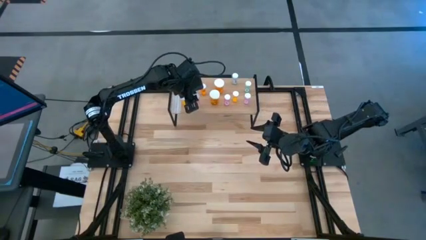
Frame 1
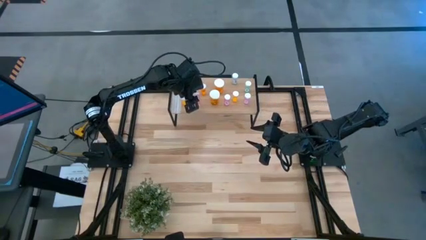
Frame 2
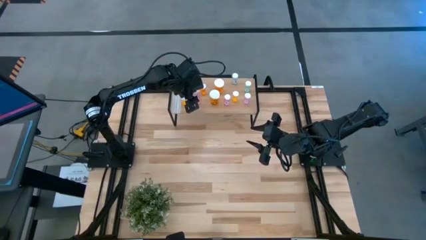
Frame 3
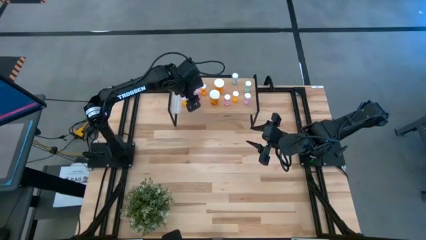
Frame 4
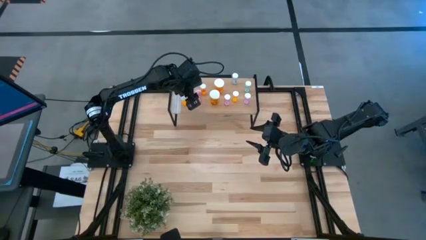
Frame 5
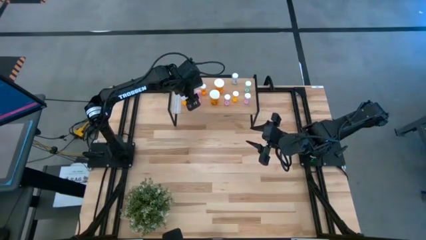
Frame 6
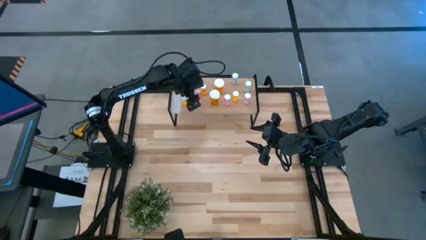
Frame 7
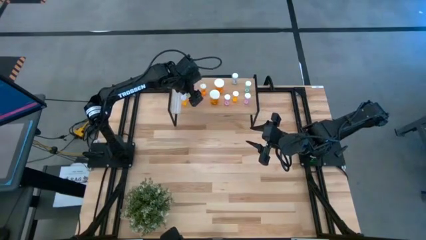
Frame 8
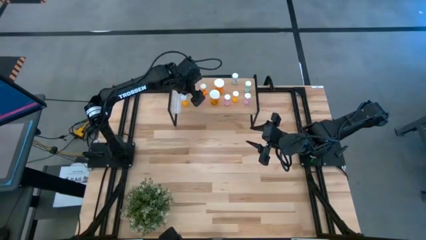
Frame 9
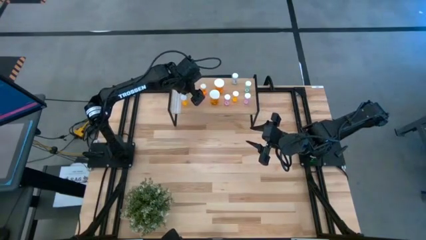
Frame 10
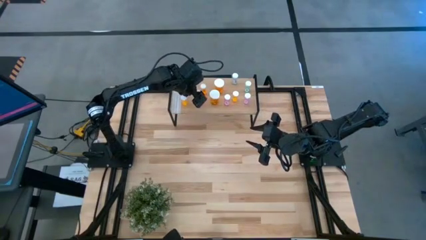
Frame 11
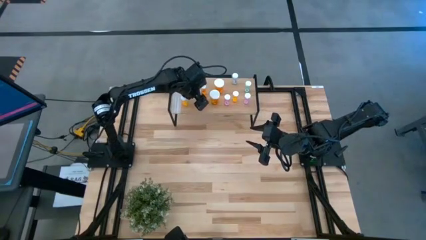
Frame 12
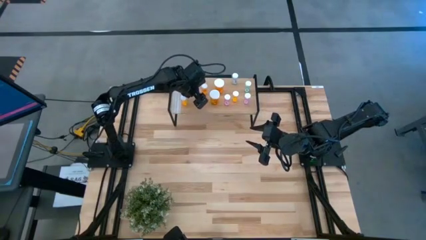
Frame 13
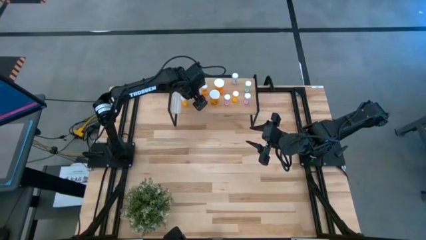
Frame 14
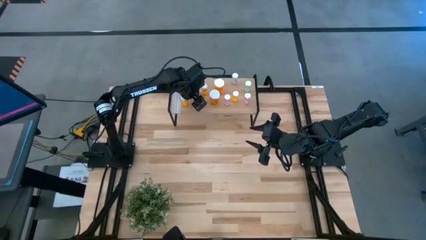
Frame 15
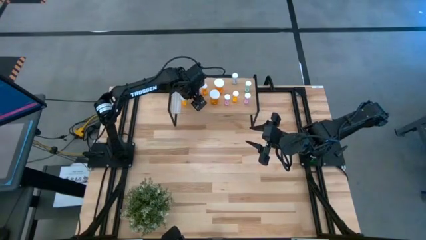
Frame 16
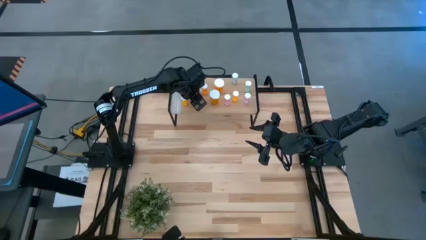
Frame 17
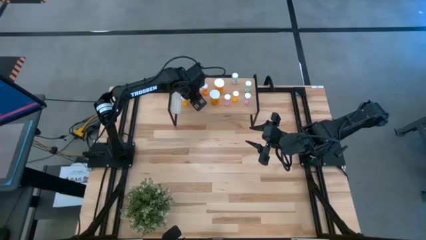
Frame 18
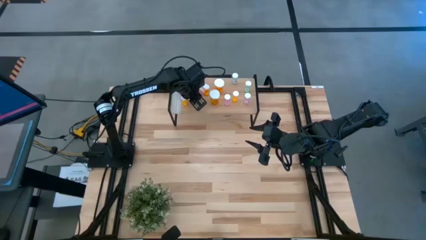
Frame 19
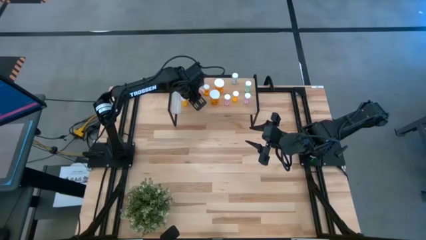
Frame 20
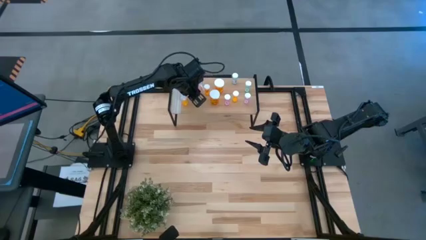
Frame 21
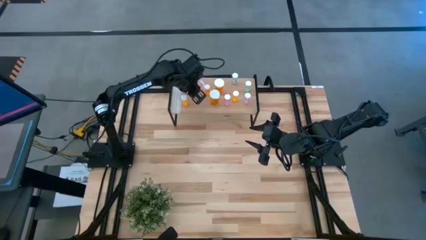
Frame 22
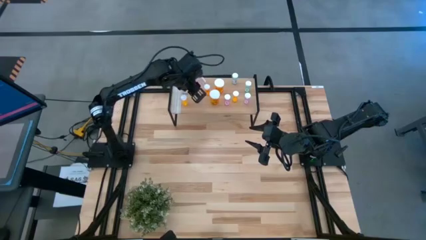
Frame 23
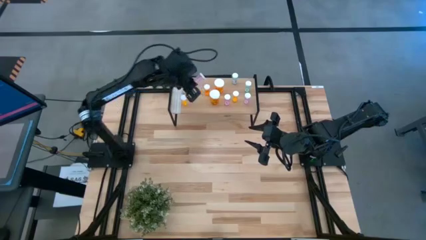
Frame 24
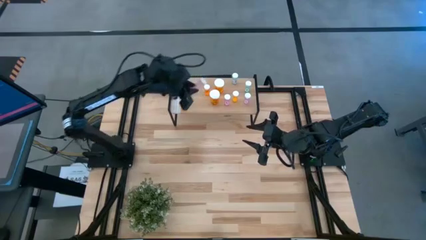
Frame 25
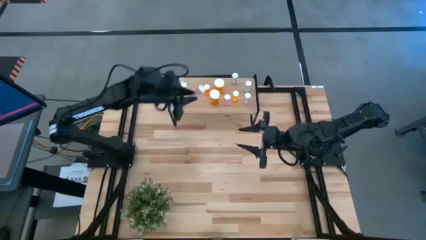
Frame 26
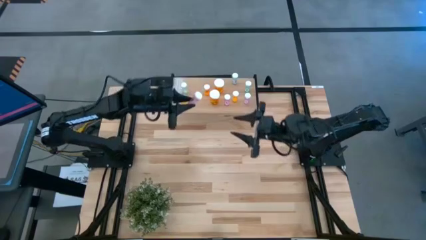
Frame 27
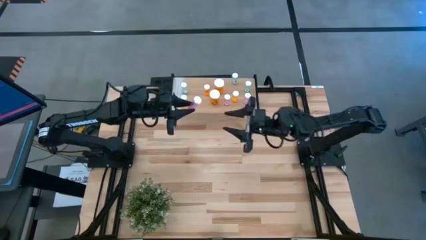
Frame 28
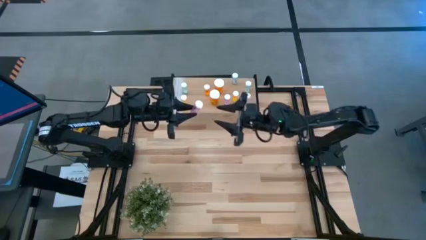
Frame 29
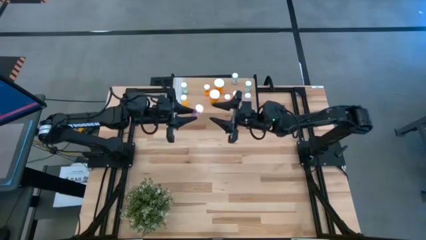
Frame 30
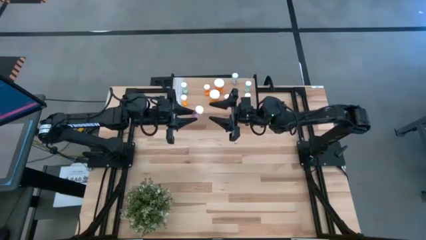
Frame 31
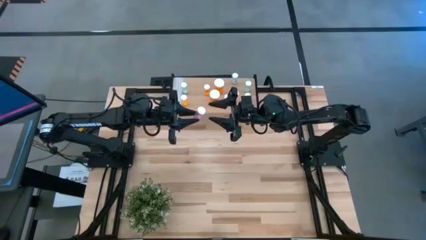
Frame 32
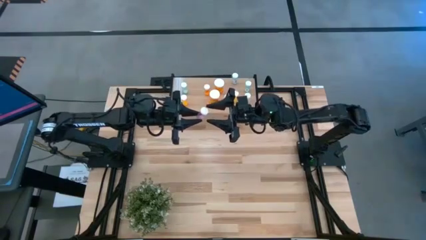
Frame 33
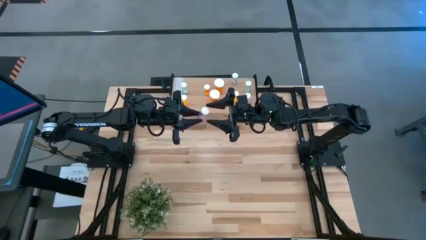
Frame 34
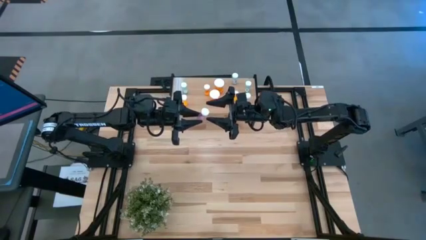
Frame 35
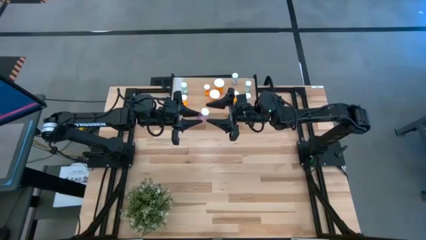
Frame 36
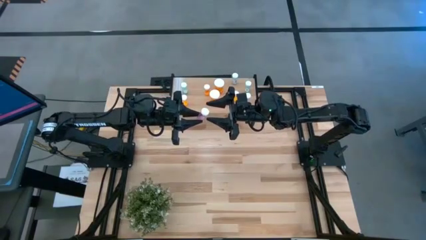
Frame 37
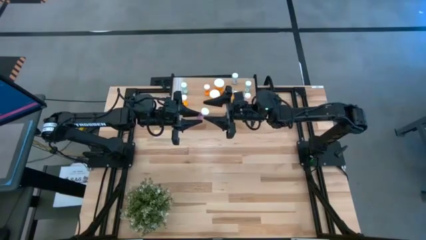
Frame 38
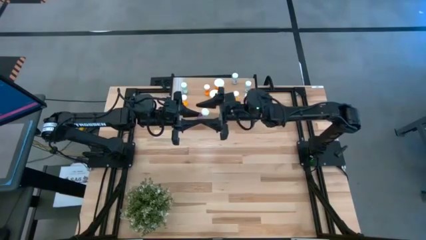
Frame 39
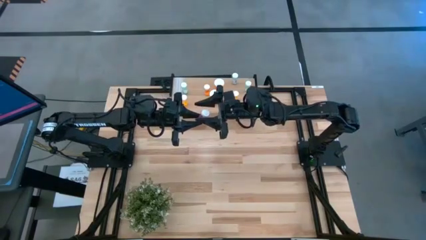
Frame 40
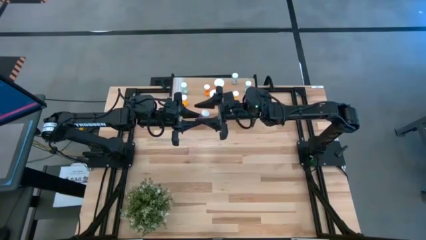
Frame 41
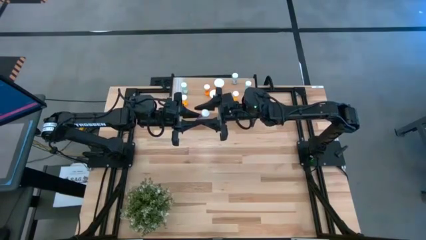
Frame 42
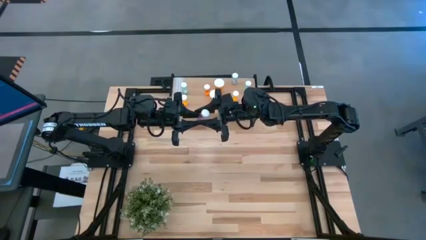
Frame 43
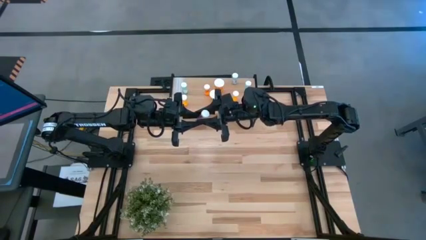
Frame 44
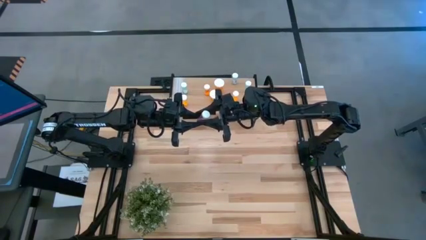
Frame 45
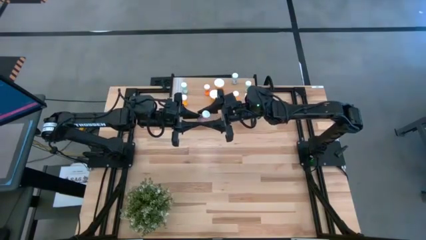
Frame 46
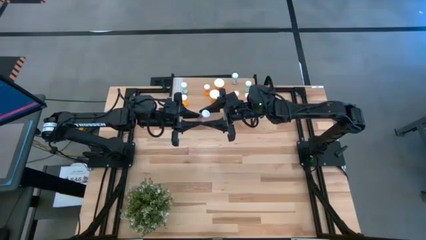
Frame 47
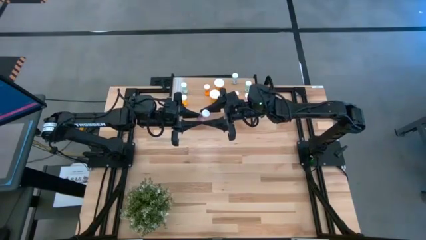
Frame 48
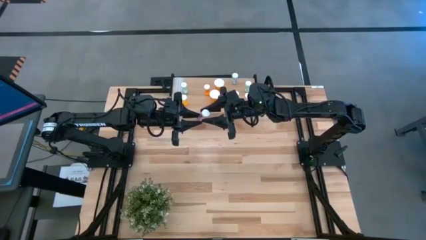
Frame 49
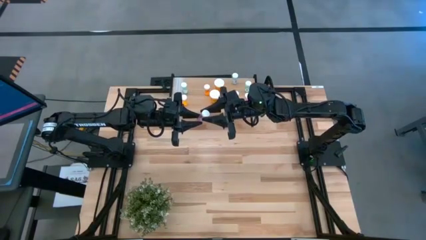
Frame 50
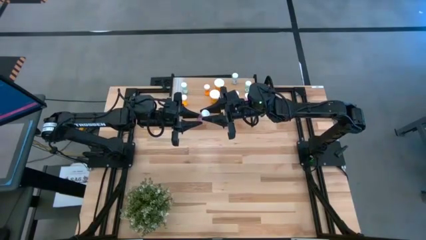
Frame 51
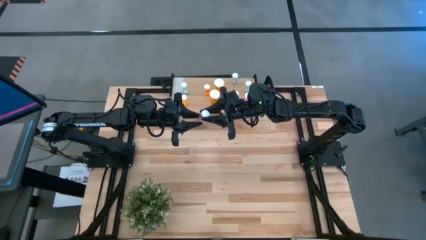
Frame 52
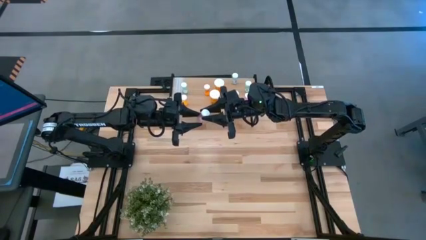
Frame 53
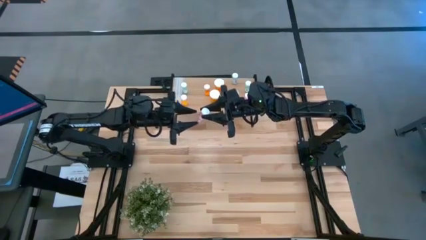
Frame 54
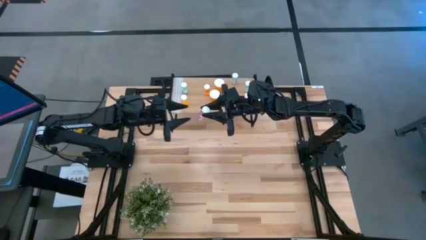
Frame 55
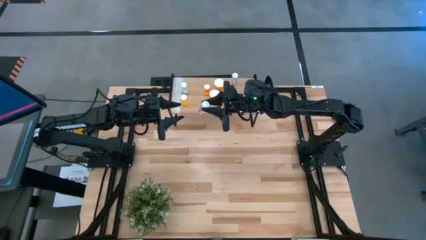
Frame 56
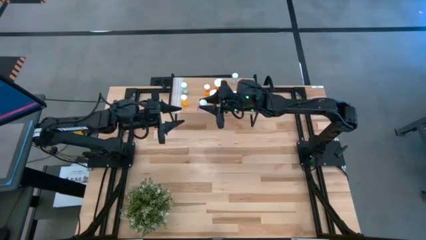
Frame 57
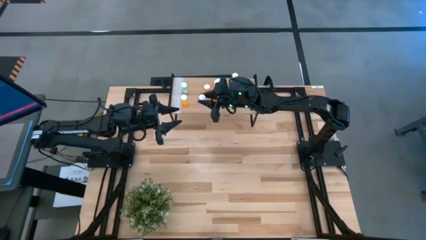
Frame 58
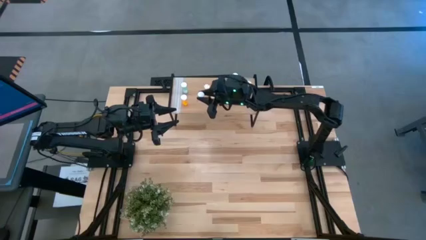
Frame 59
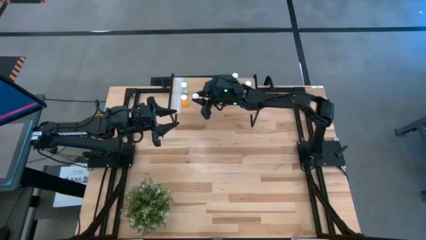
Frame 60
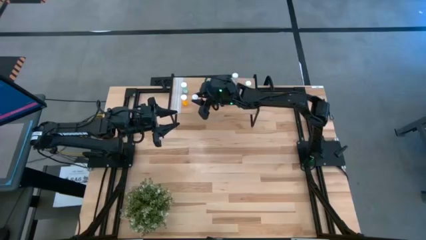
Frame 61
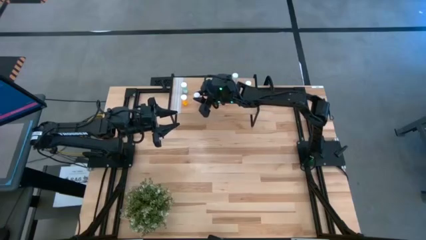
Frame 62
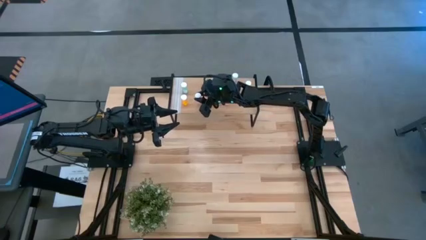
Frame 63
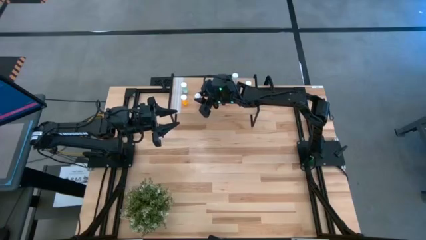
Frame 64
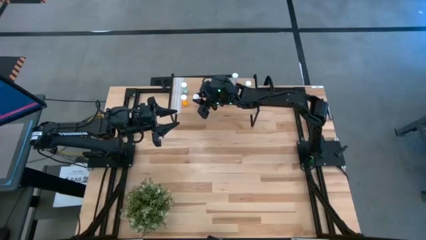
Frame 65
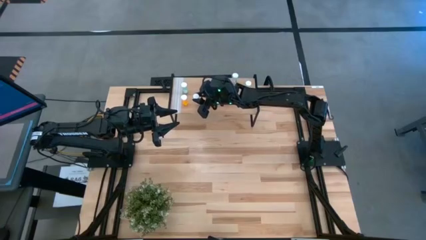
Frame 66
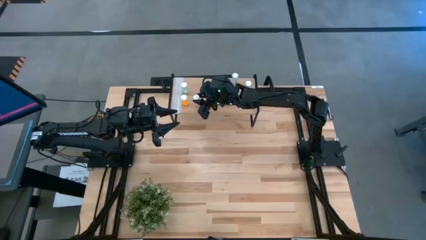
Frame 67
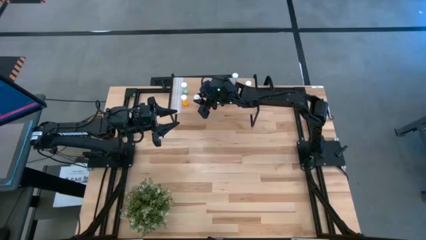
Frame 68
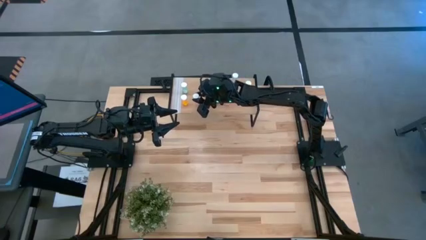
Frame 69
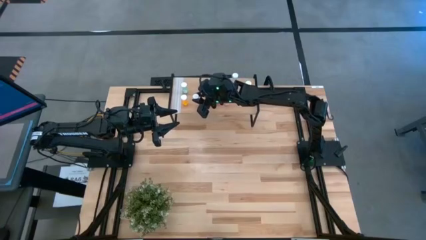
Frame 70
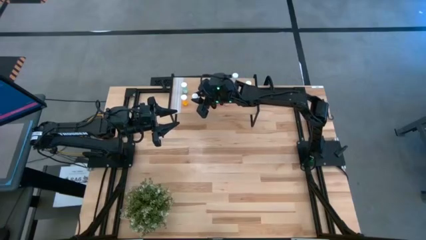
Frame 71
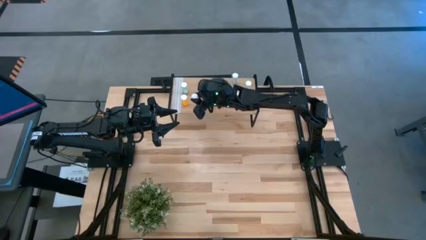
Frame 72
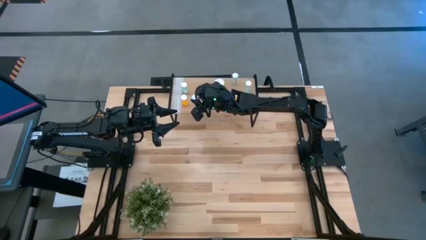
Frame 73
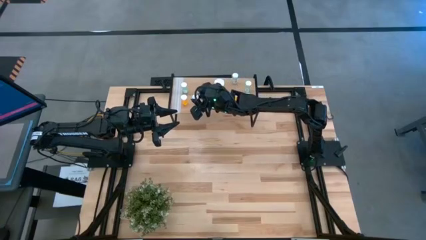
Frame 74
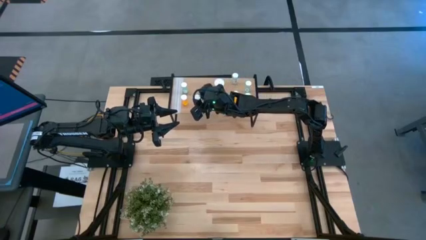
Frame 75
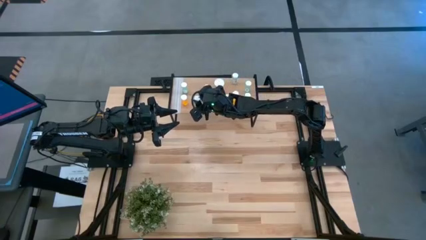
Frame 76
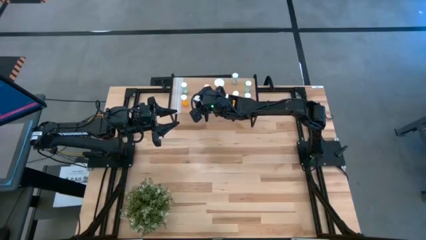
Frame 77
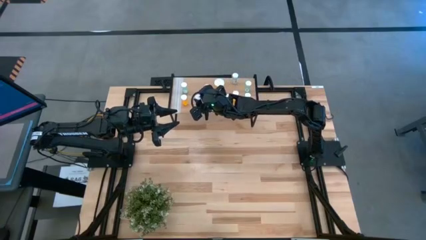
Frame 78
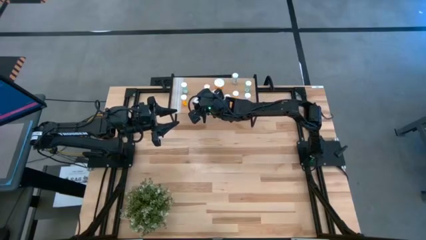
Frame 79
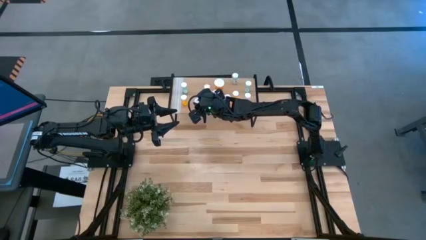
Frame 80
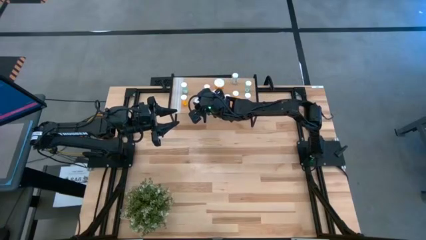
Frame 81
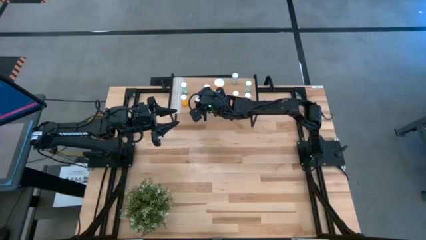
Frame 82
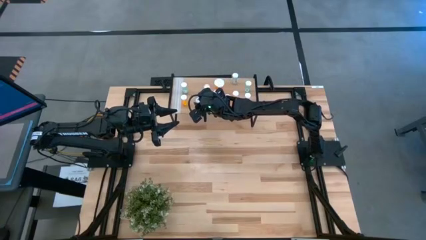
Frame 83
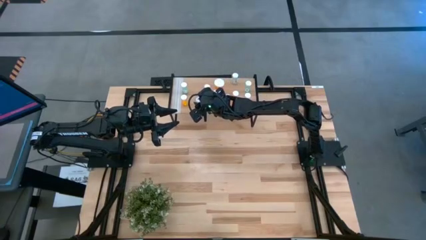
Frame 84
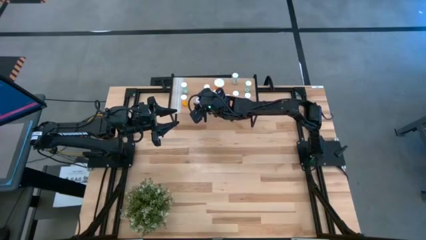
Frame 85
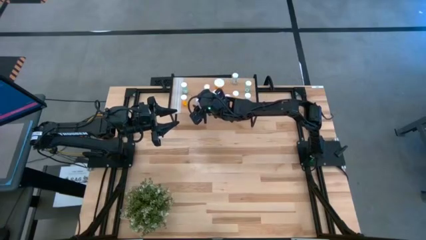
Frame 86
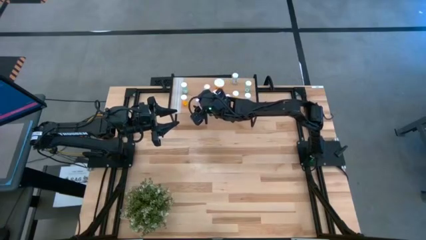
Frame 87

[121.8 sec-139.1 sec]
Task: Pick and place medicine bottles onto shelf by color
Put the violet bottle on the shelf
